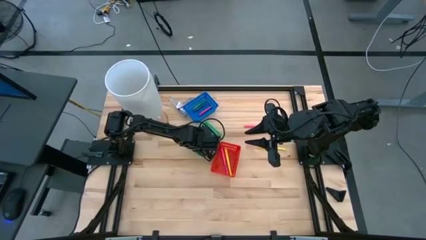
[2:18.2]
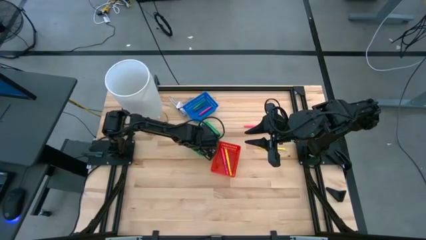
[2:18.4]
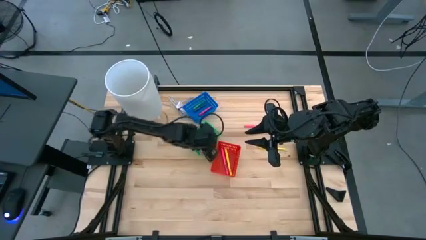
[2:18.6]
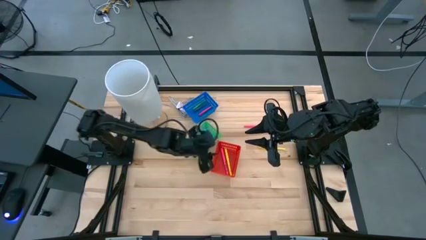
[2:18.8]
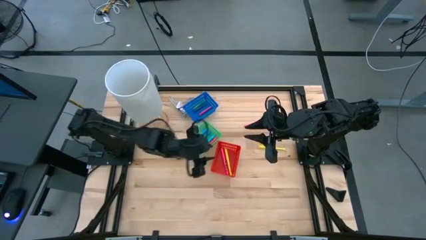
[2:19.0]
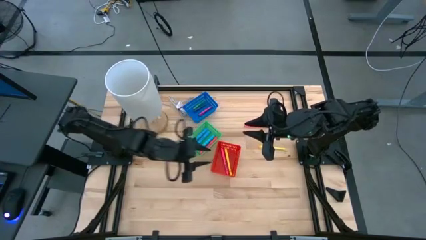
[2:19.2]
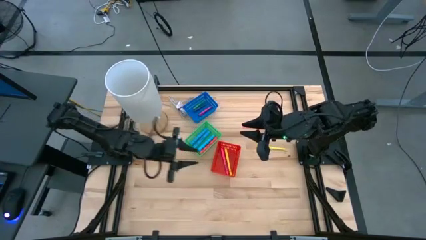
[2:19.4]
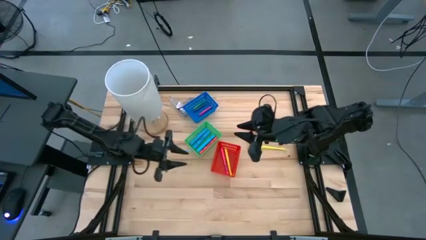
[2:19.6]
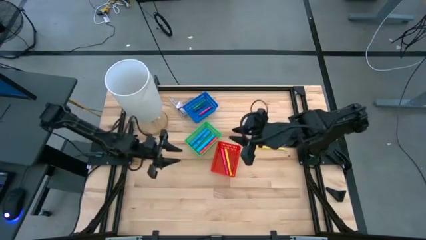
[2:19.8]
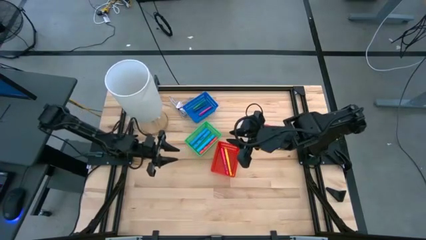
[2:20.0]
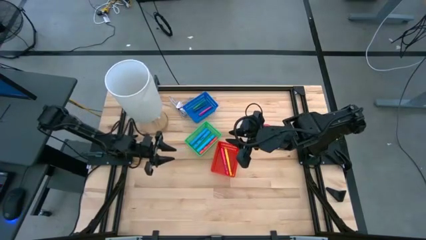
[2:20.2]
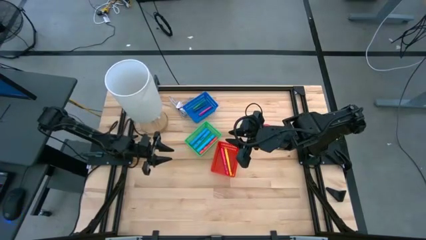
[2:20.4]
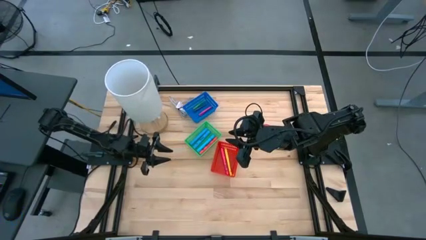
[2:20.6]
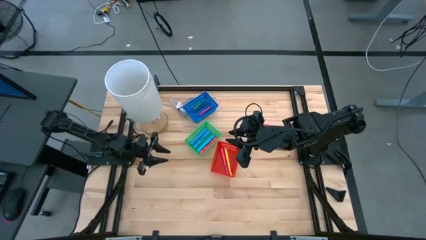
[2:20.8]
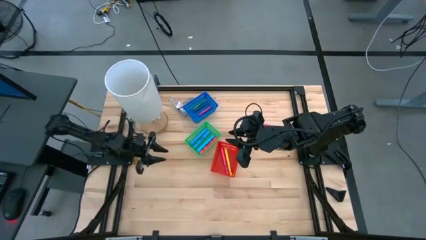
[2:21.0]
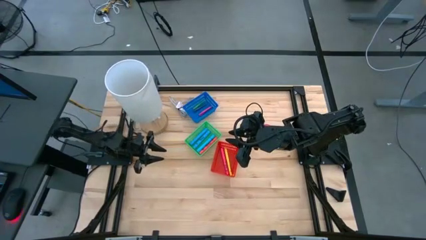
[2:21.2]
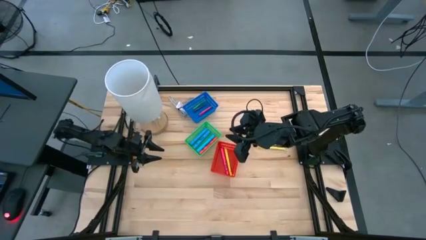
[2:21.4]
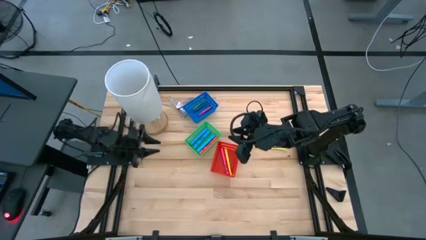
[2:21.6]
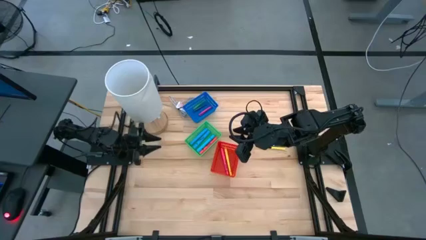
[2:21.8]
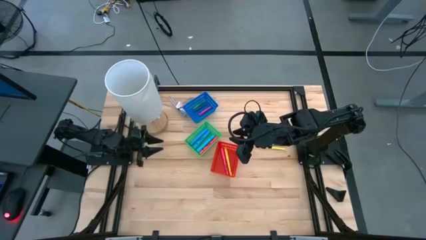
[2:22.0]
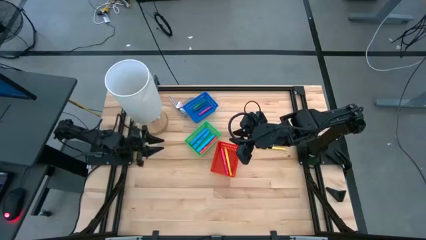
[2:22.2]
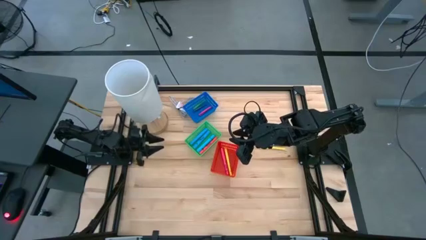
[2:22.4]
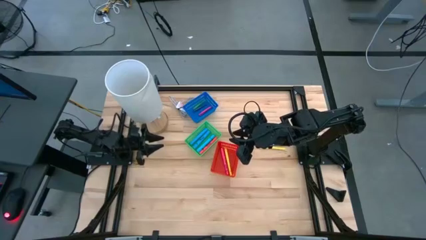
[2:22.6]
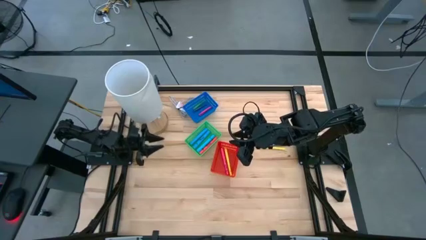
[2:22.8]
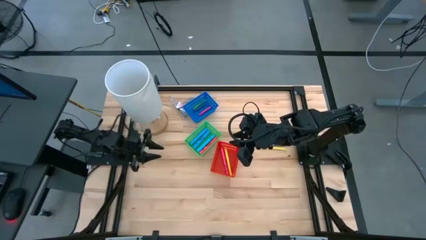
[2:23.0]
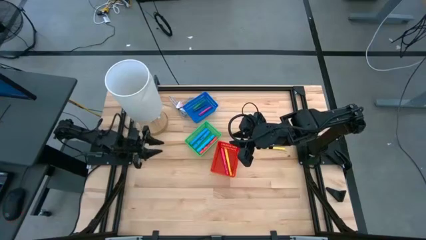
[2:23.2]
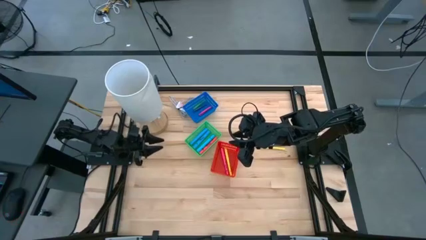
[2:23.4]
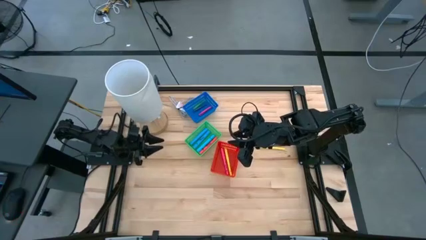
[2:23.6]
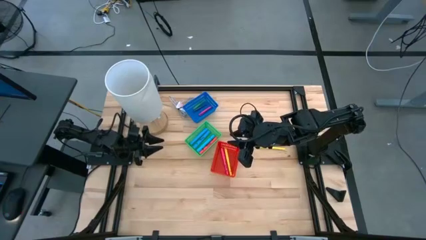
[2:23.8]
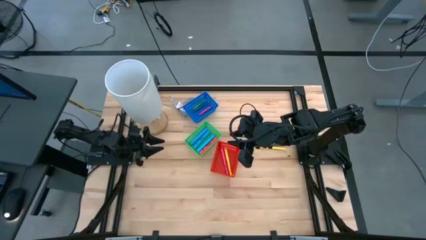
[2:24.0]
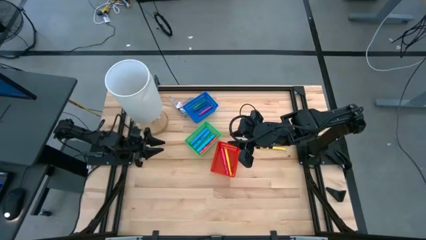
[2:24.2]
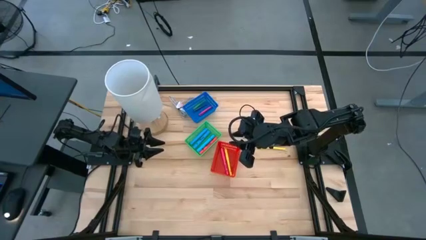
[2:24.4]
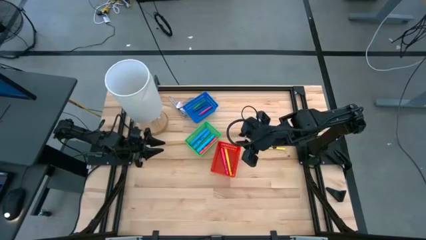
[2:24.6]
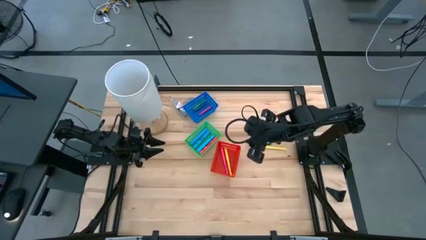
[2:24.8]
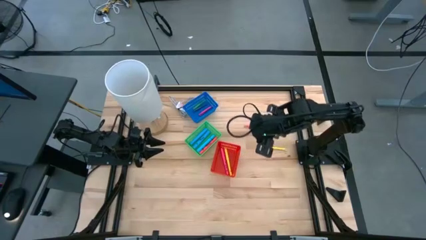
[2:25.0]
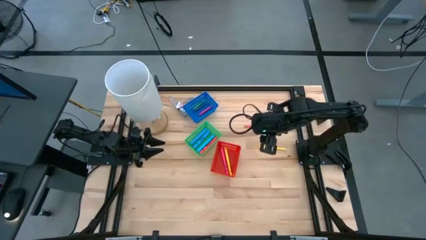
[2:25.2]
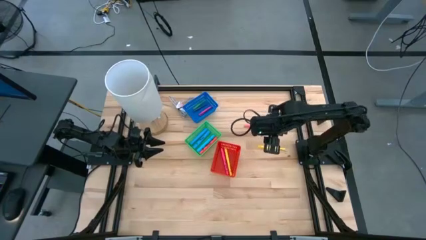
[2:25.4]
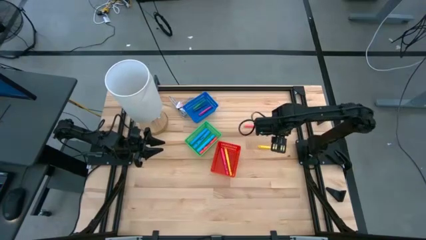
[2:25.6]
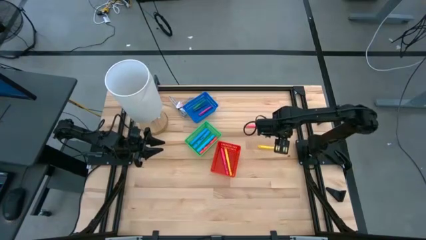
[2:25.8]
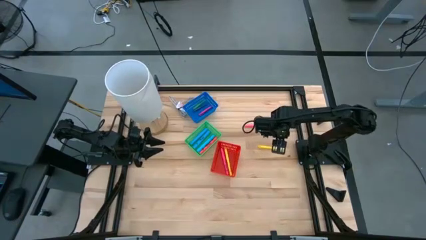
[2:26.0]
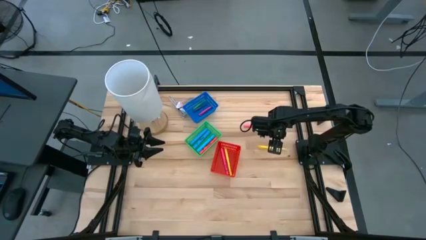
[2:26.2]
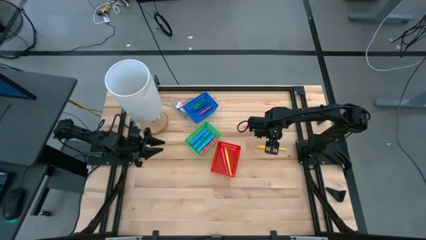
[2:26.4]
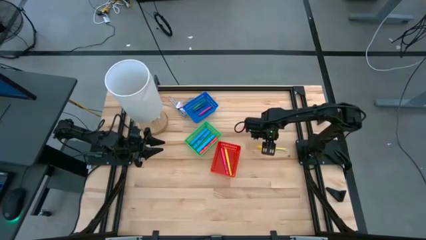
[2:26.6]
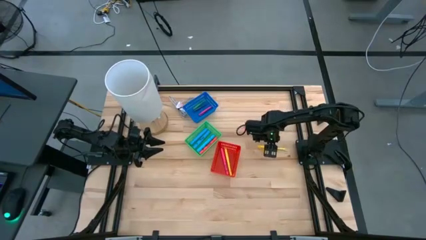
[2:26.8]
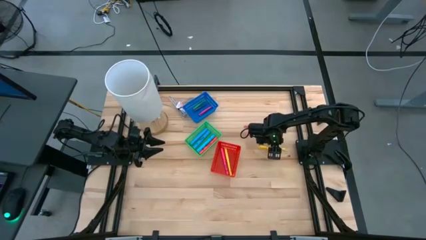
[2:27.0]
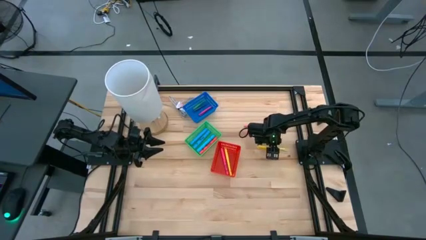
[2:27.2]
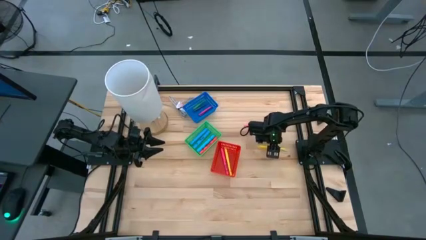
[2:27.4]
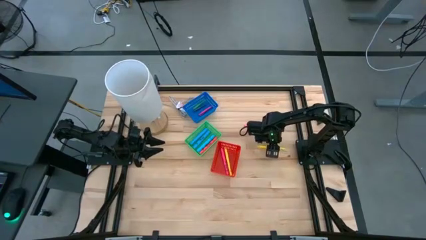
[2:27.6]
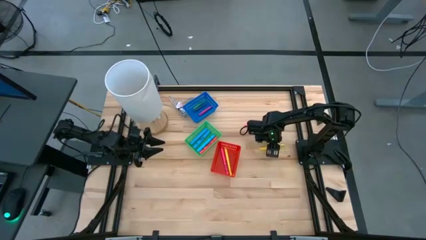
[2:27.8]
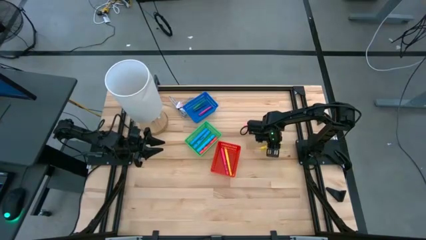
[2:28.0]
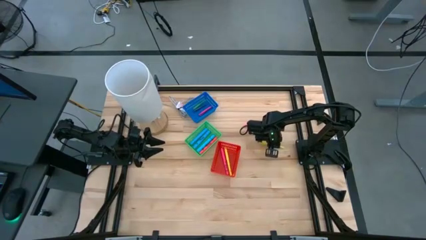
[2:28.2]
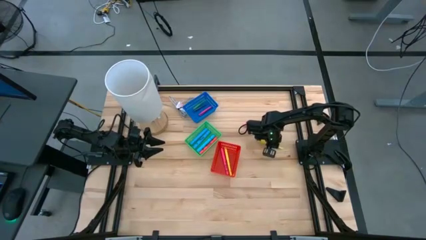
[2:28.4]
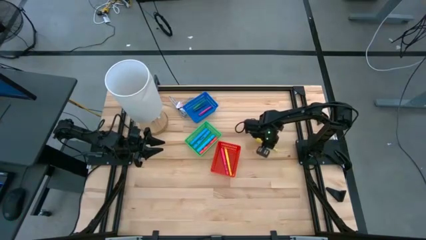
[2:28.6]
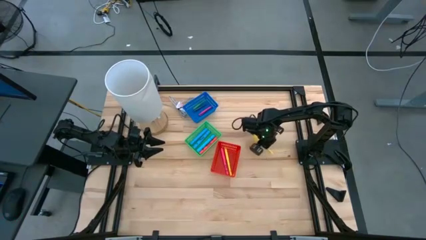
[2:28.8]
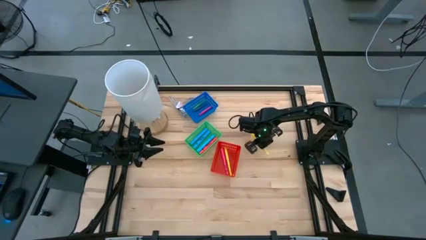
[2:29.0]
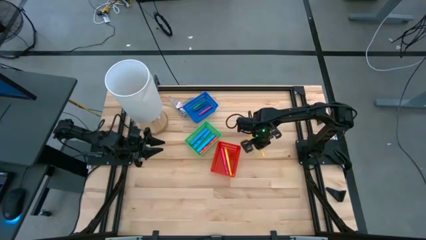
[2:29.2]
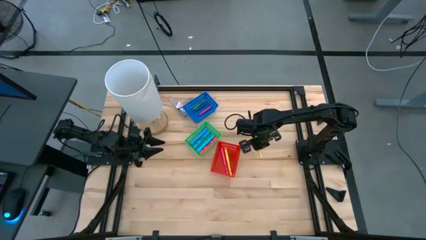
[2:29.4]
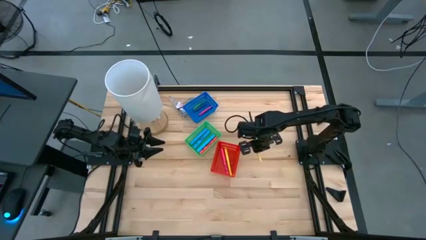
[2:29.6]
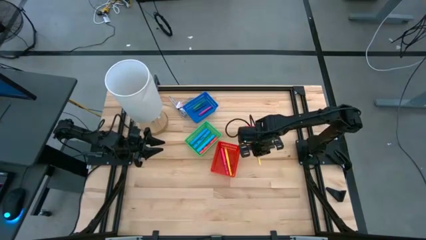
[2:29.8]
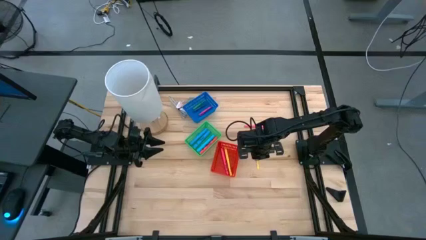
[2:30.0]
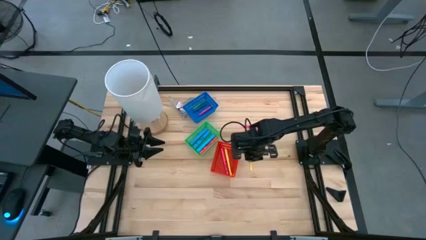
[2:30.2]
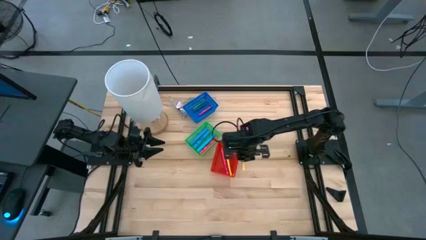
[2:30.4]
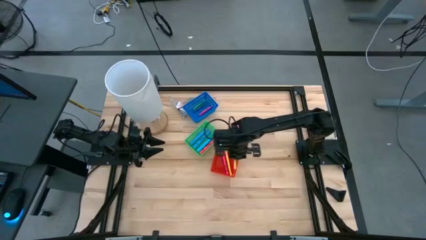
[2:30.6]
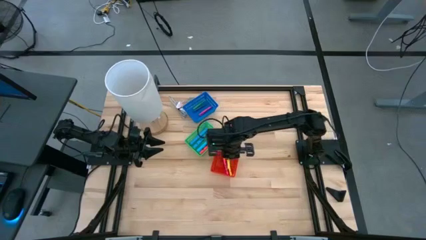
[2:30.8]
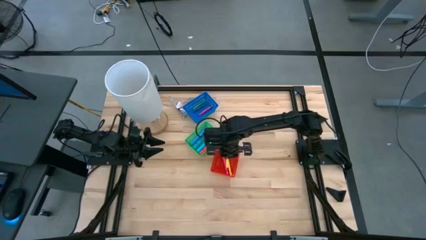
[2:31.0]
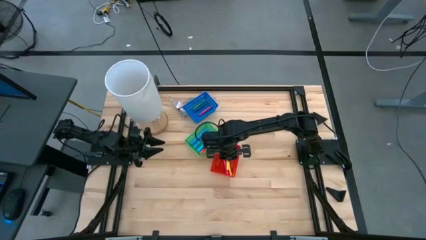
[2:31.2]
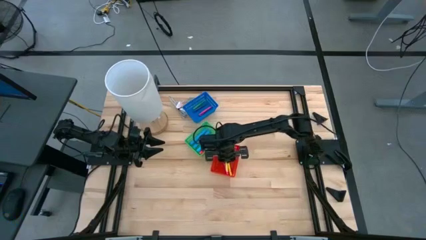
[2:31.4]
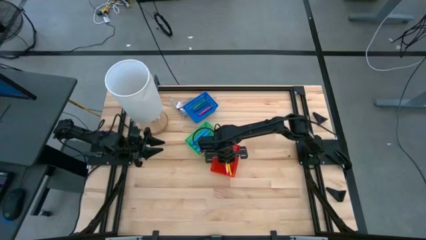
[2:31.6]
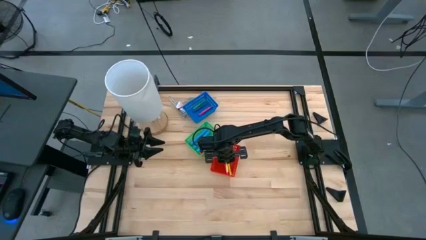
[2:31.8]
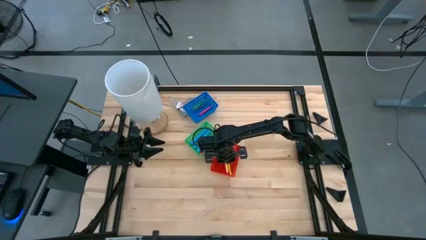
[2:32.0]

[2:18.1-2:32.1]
Task: Pick & Place Markers
Put the yellow pen into the red bin
